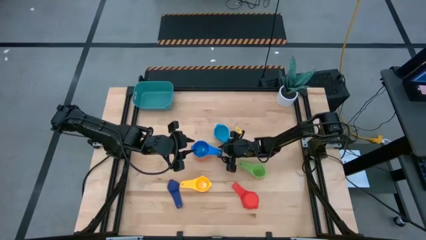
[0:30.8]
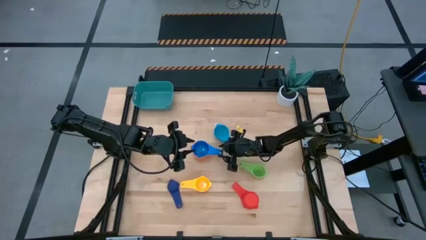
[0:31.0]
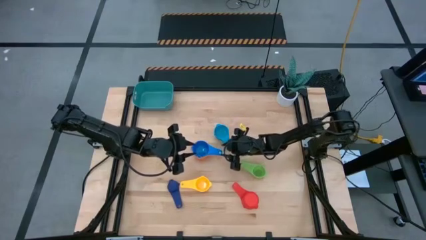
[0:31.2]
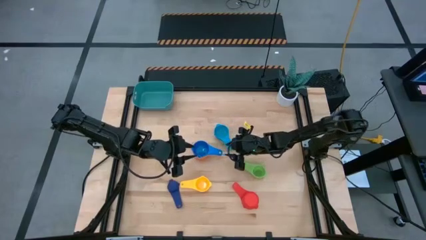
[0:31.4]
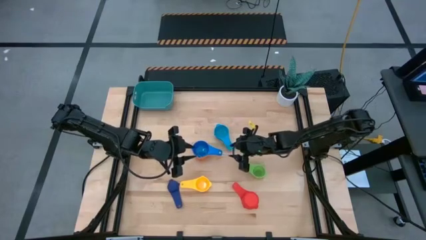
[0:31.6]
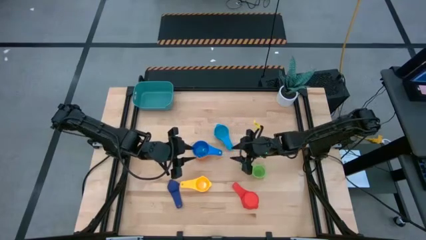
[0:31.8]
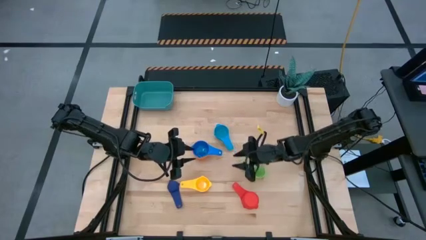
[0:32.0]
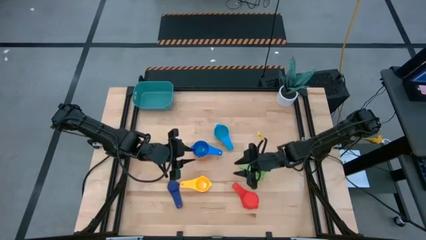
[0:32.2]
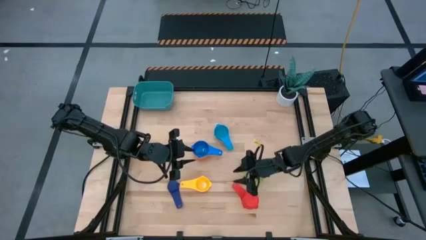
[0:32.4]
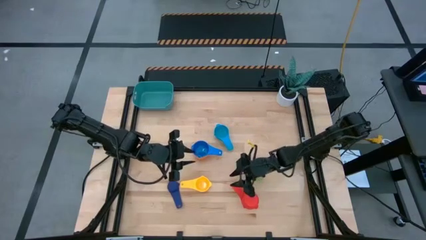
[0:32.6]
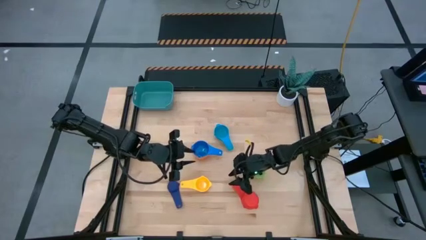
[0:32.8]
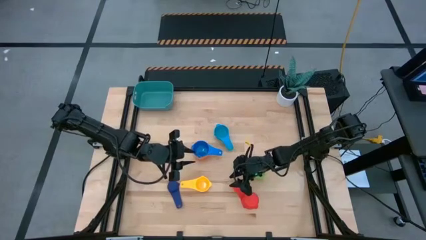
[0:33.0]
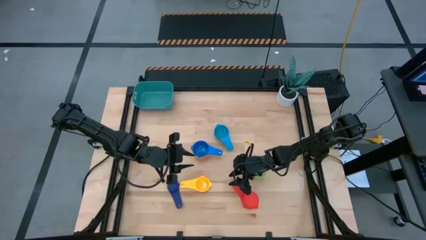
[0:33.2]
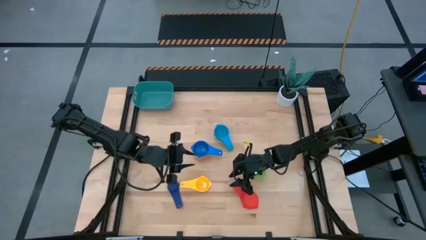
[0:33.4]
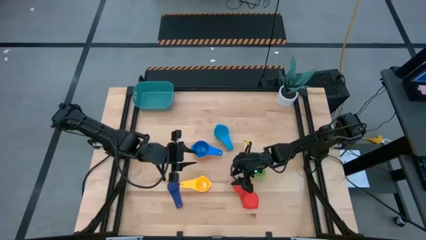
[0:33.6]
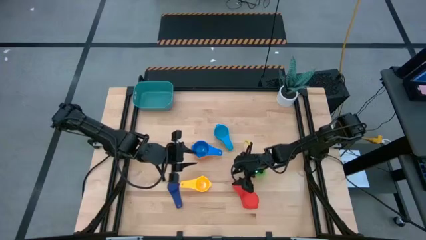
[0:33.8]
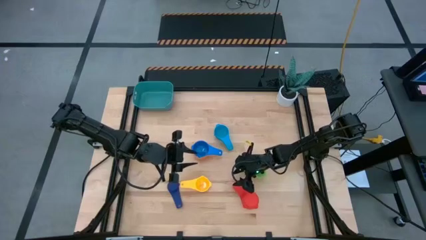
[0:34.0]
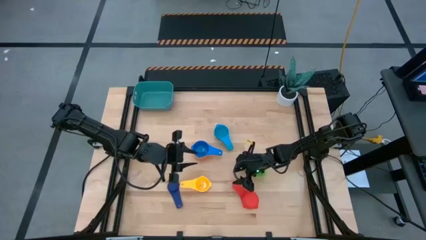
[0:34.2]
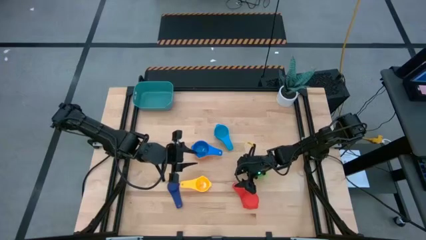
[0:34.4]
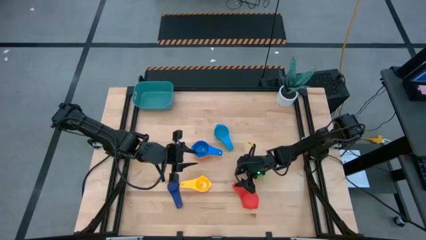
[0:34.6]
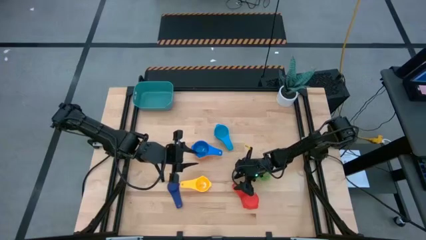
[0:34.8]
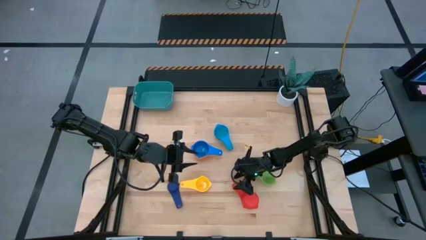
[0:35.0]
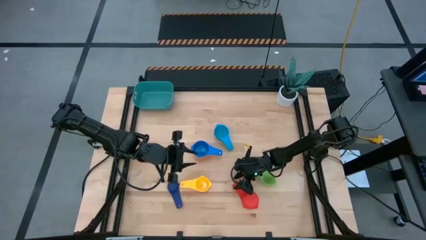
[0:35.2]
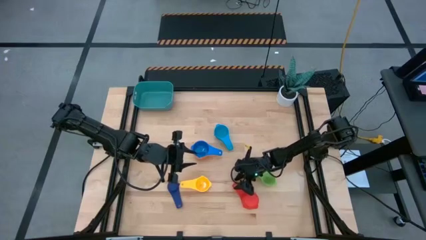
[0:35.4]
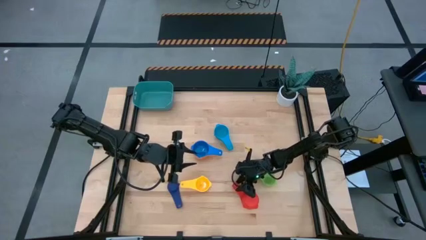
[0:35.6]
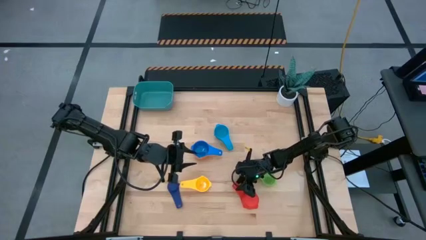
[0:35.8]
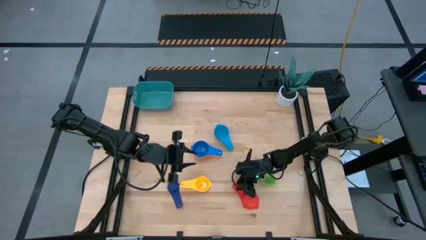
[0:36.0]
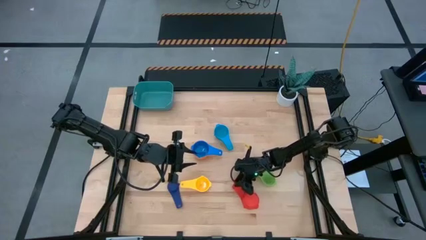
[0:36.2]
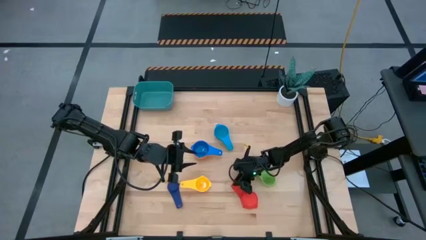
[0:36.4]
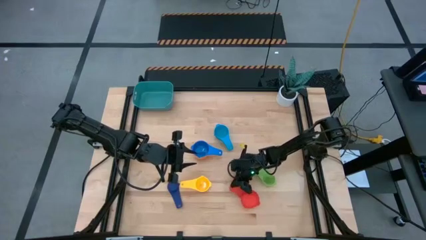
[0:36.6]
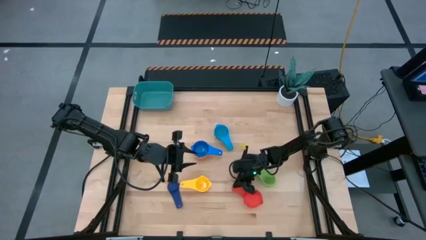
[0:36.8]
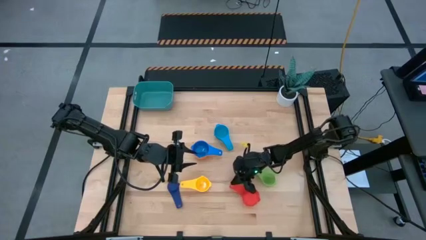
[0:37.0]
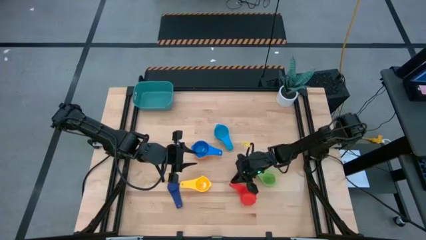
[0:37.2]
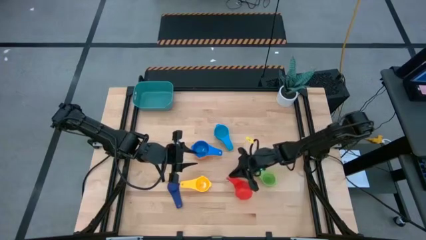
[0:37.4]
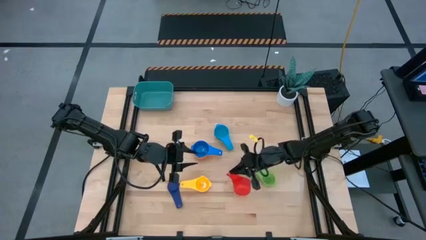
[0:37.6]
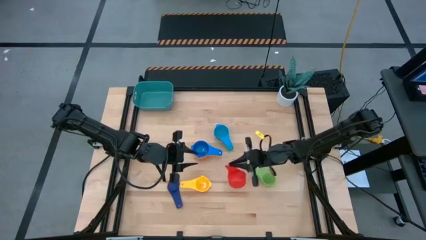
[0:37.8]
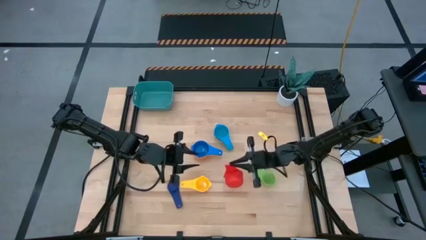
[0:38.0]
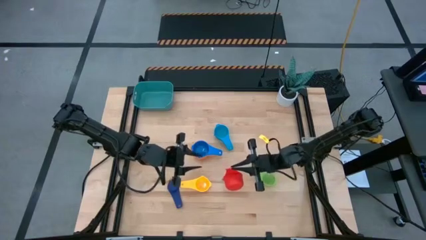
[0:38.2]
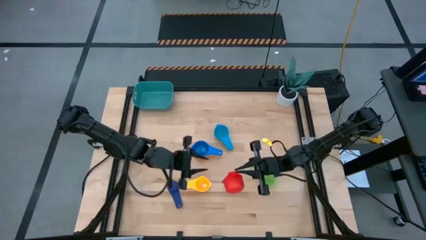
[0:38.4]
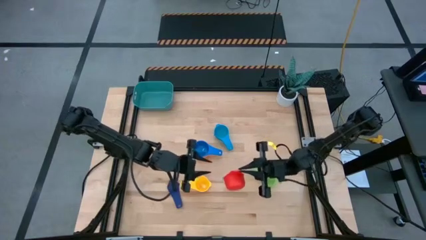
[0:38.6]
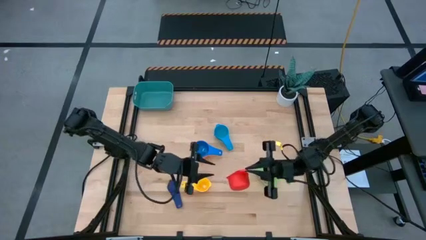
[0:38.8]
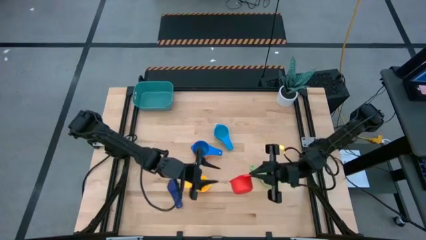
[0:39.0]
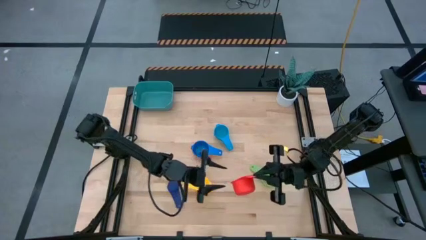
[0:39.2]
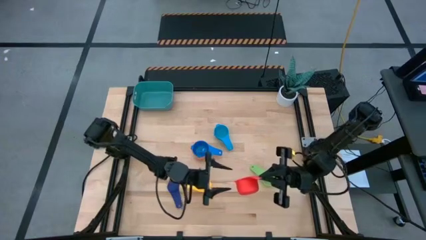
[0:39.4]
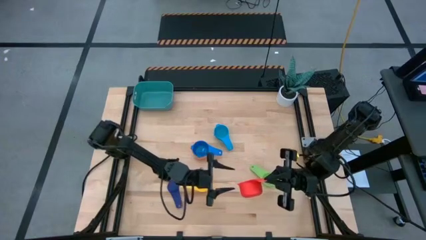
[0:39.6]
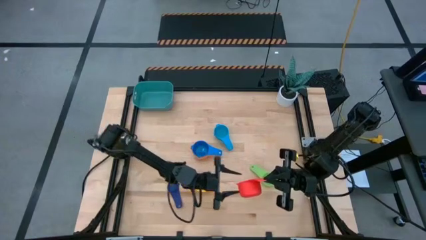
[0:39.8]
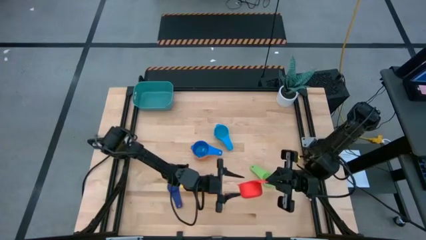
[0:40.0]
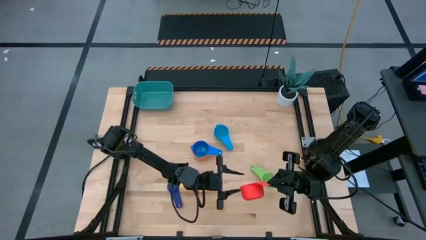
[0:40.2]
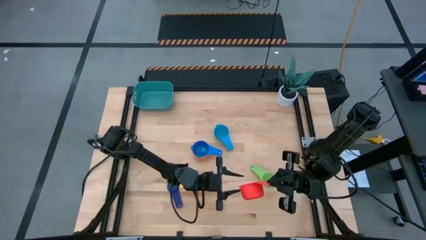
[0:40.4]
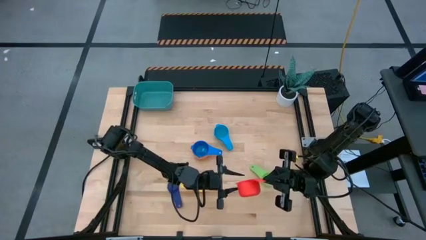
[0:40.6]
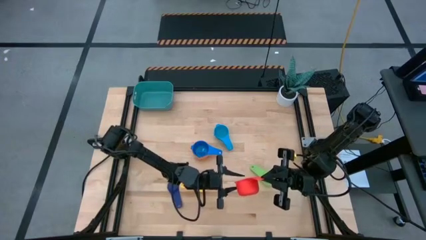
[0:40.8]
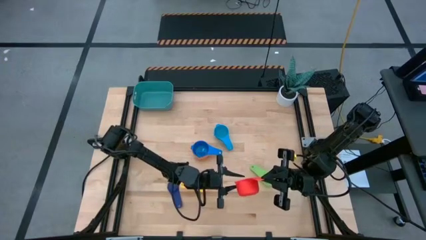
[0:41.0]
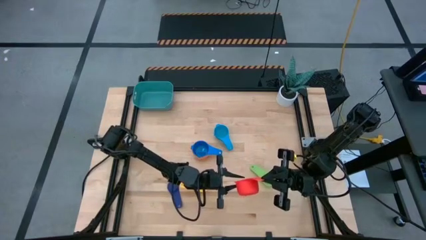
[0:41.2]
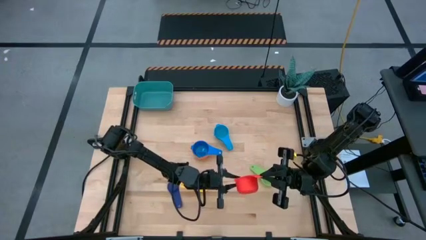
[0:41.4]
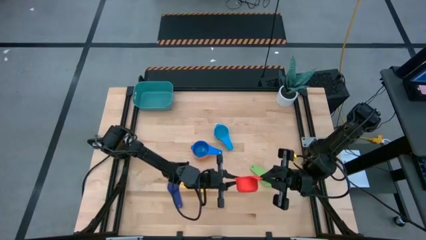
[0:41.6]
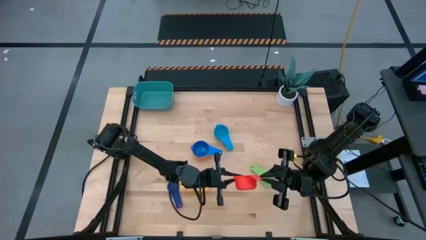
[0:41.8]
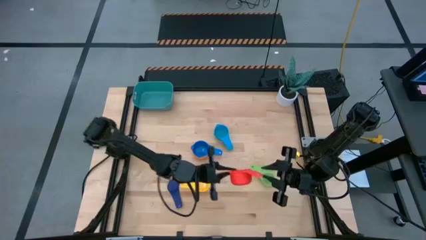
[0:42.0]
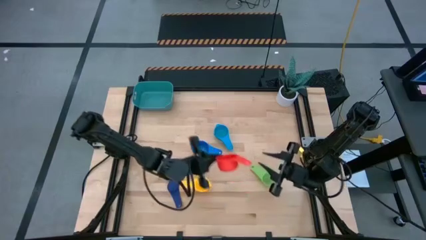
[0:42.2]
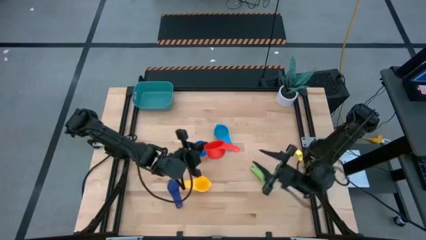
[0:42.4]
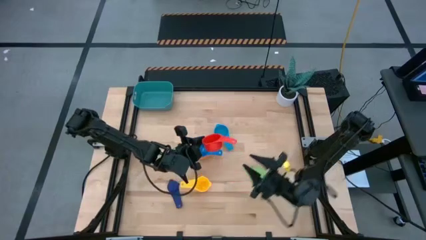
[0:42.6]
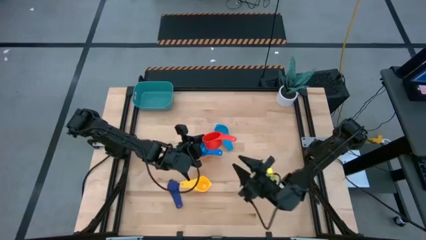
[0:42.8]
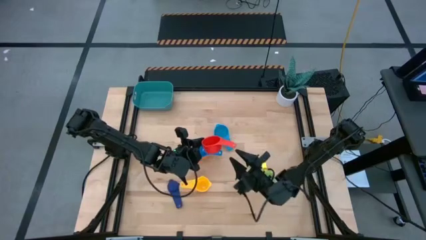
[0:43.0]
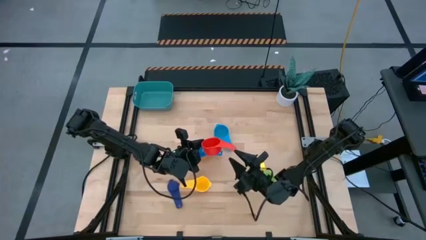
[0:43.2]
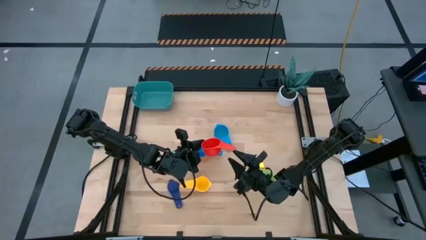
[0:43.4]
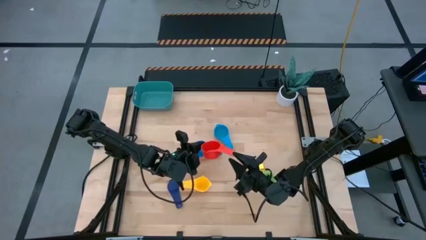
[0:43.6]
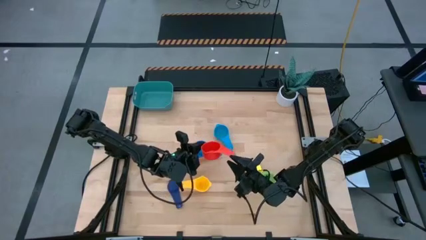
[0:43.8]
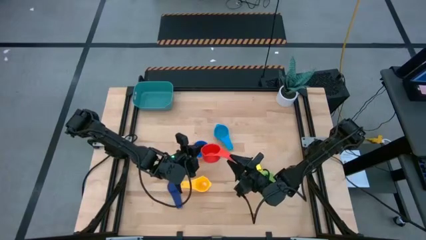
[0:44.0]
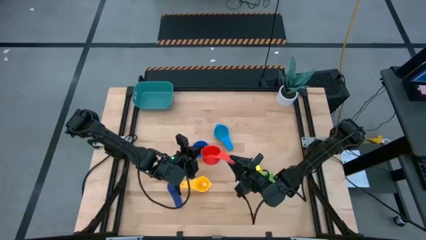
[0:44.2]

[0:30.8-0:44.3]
Task: Nest measuring cups in basket
Stack the red measuring cup on top of the blue measuring cup
